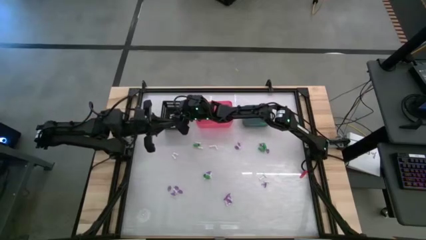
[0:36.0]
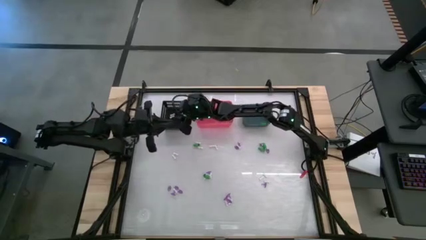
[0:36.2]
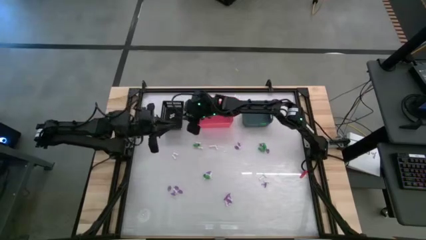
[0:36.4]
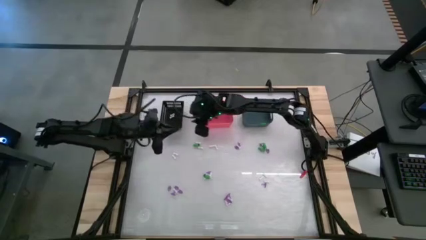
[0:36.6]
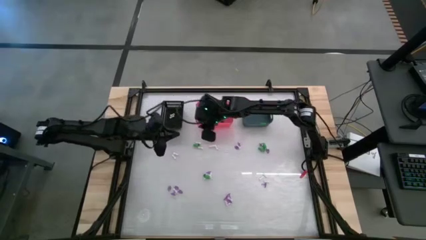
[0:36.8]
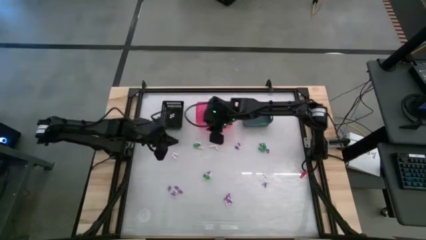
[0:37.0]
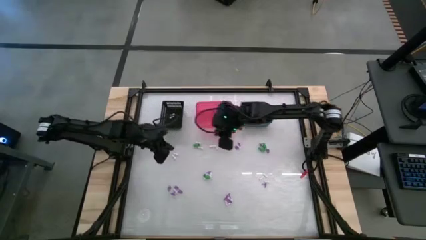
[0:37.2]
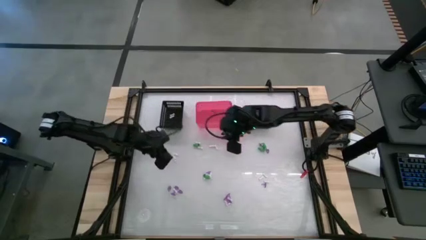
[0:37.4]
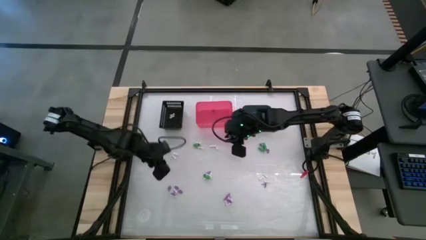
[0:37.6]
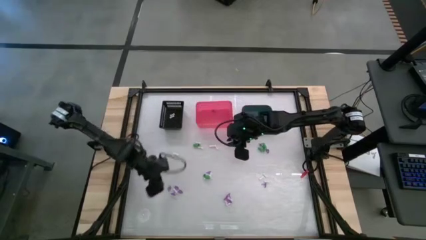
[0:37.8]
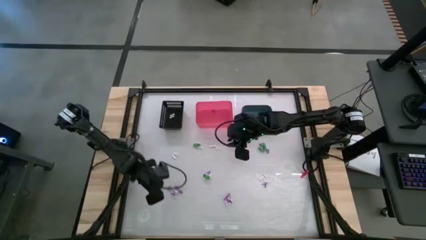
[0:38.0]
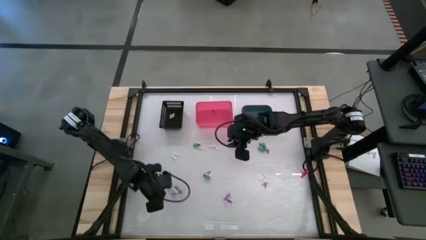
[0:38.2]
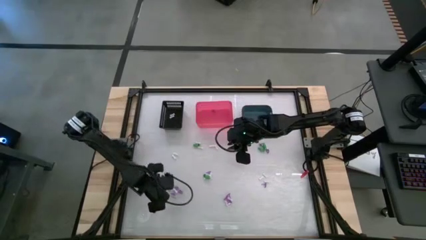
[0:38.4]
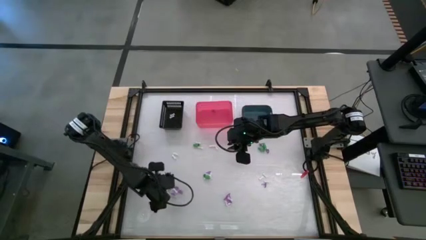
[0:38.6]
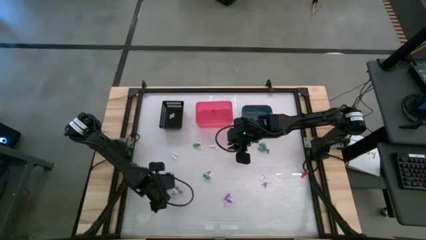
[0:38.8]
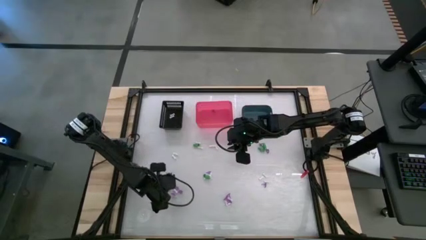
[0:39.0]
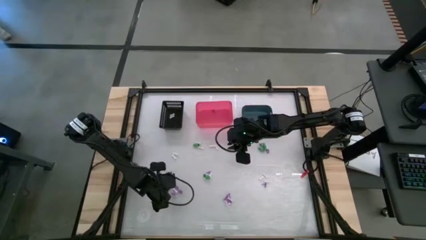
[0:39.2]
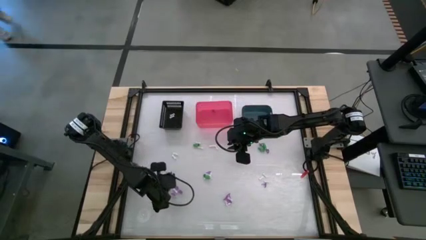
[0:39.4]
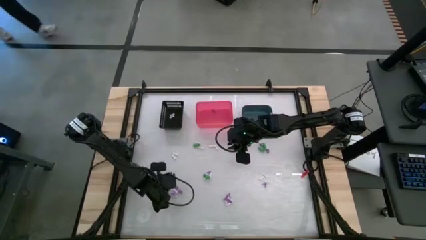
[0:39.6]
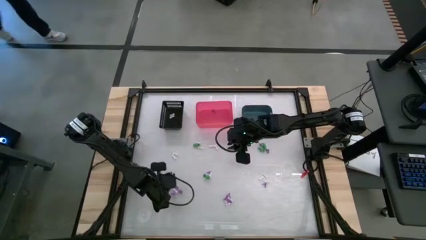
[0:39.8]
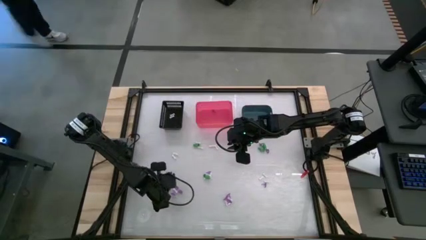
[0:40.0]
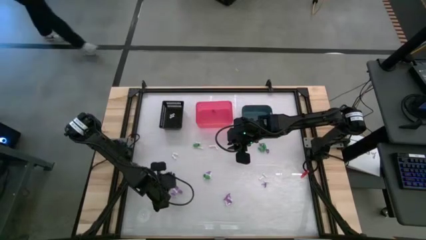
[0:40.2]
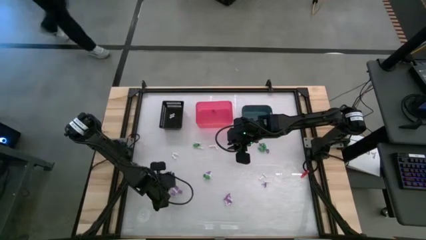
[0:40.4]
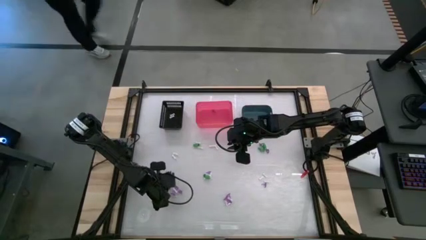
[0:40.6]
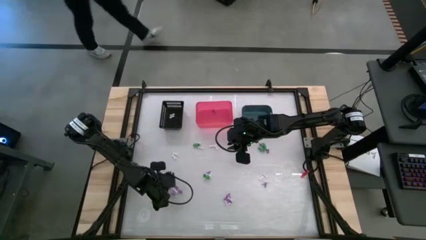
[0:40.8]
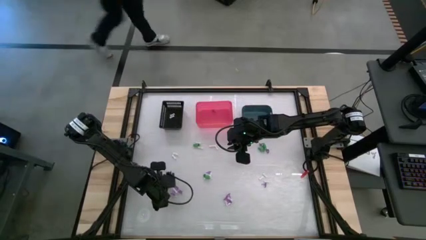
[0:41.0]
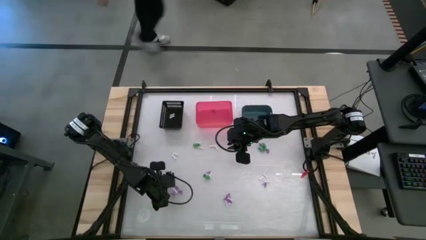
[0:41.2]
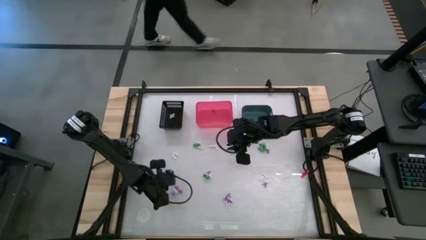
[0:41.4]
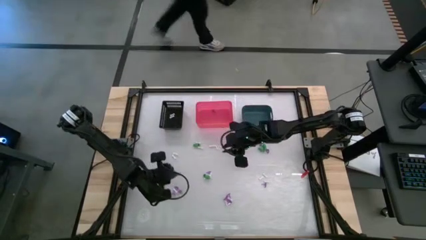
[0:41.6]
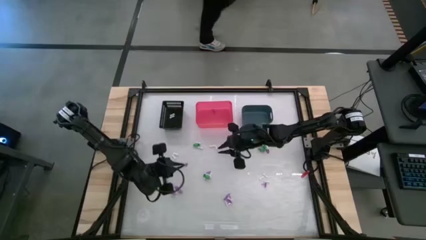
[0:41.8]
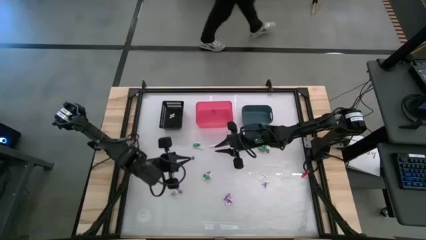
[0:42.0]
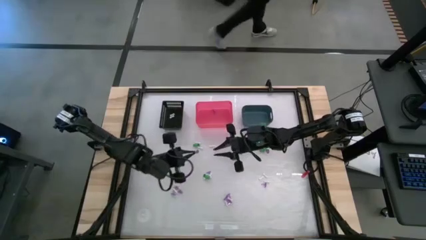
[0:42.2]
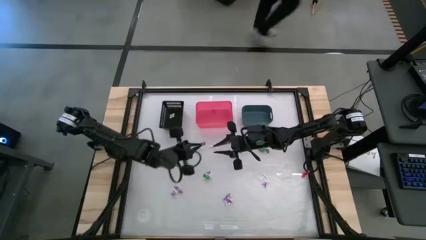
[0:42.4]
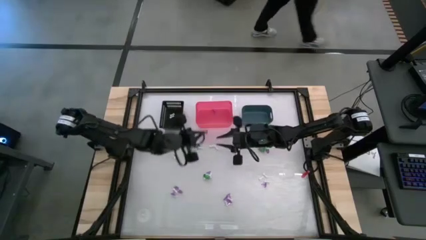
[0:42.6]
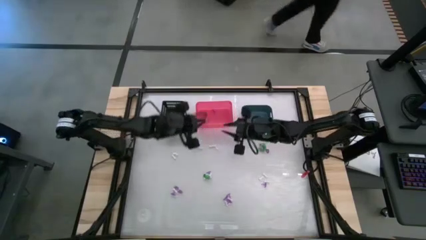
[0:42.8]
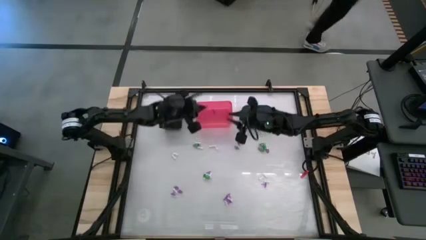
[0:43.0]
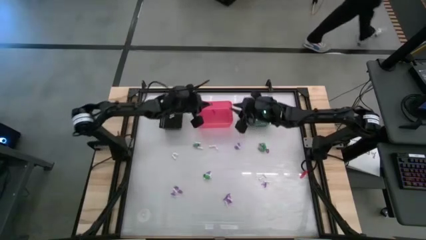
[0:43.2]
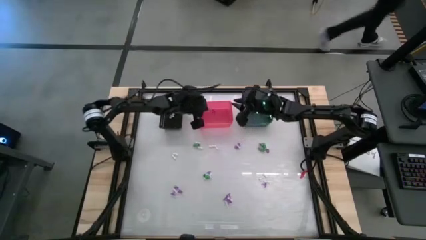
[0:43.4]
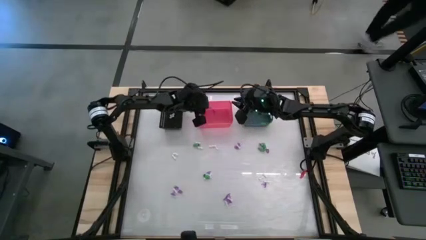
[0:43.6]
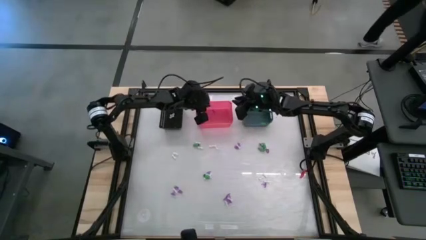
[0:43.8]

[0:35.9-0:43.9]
Task: Sort Halloween decoration
Put the purple hat toy into the pink bin

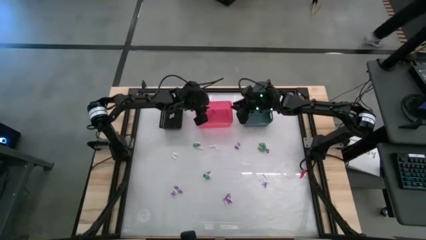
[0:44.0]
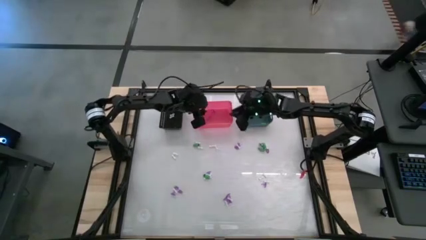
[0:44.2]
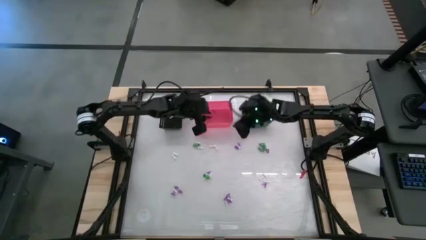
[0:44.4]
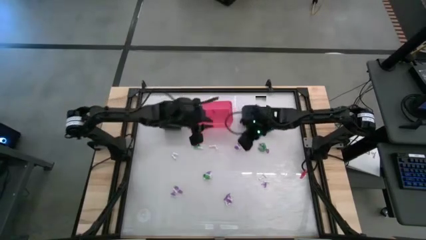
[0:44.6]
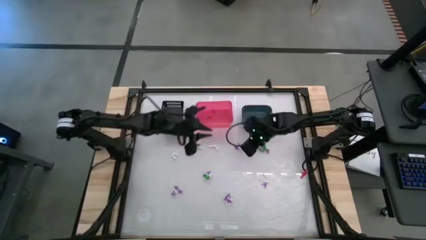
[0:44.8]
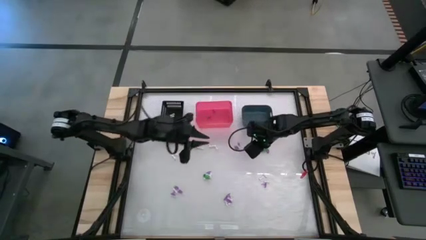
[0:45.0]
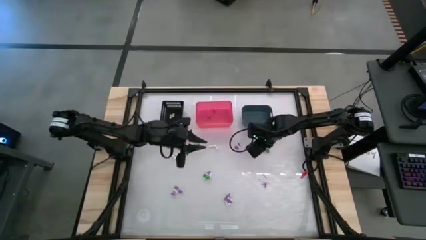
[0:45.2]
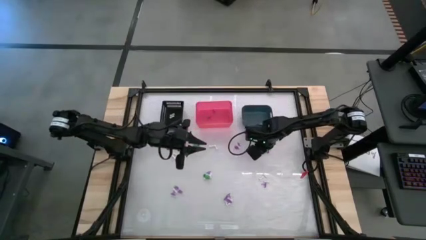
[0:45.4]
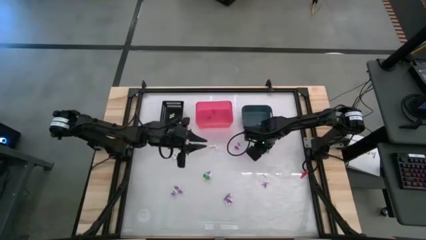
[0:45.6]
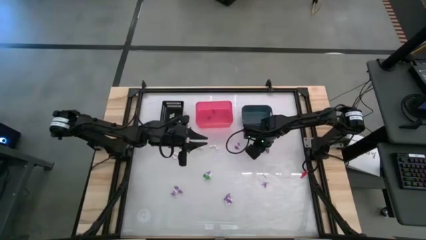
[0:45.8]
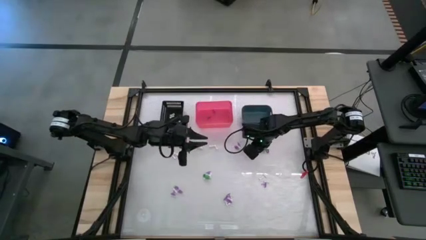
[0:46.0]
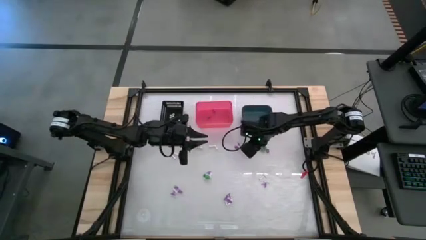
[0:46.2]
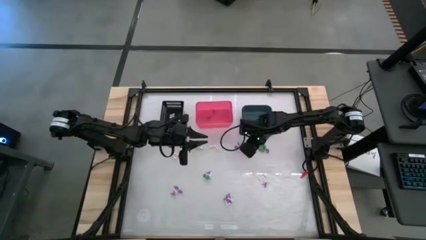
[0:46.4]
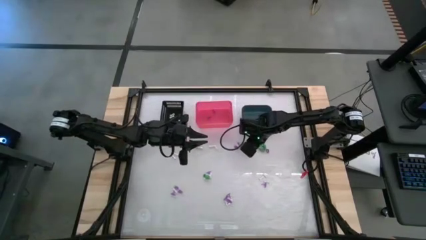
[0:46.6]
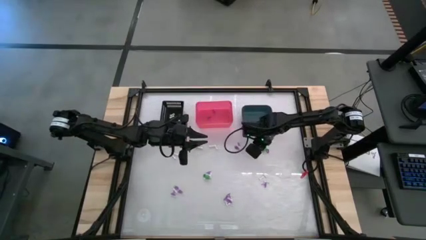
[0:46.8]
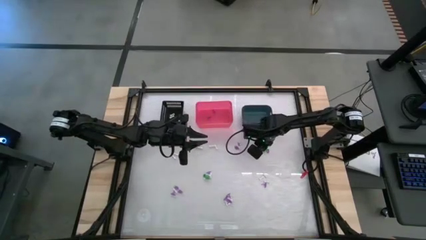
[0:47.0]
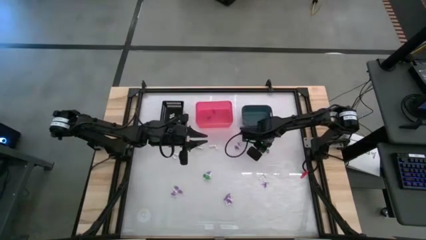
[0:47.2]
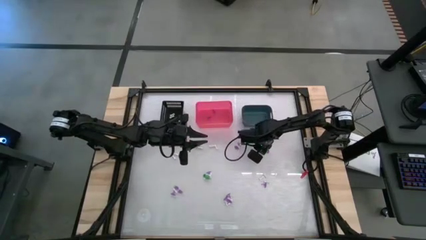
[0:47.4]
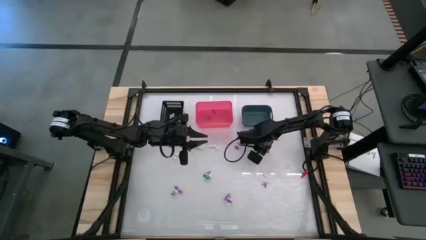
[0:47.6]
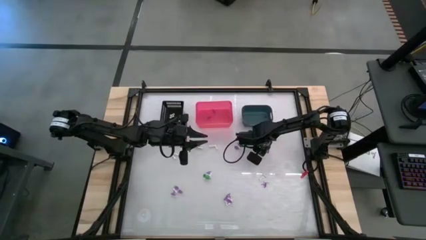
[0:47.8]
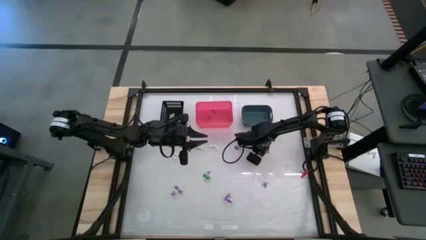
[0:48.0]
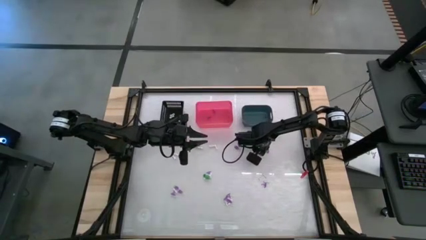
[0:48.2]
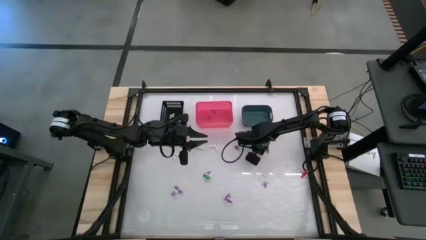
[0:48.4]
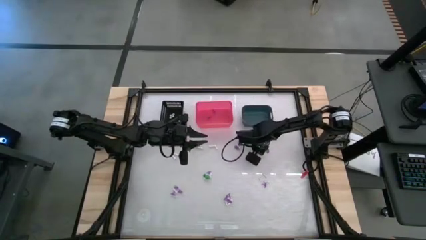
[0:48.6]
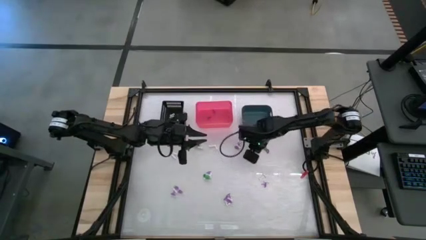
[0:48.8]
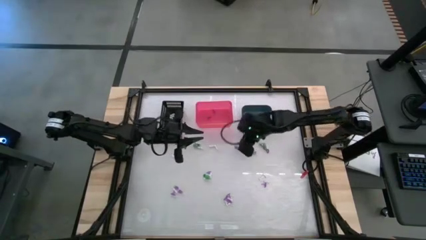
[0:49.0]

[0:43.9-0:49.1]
Put the green skeleton toy into the blue bin

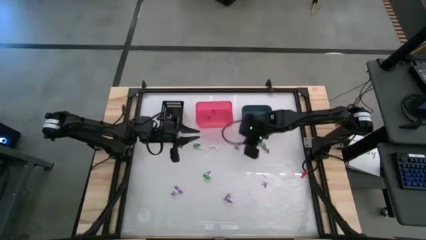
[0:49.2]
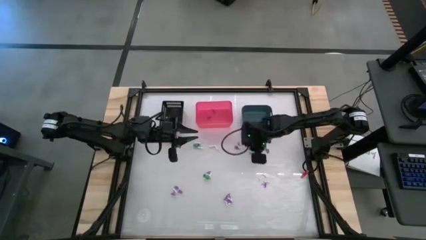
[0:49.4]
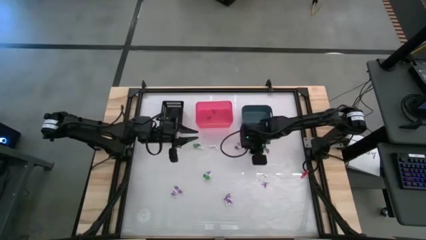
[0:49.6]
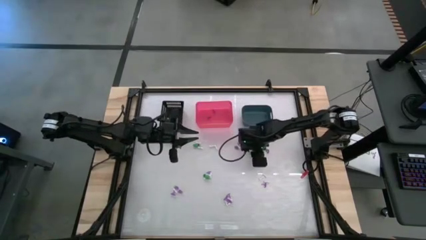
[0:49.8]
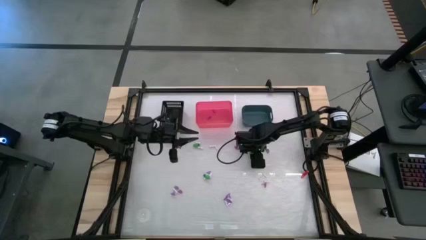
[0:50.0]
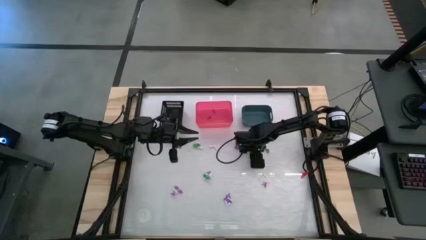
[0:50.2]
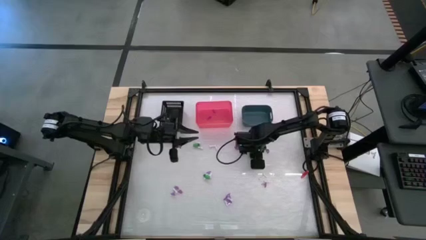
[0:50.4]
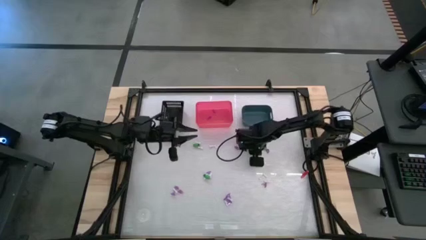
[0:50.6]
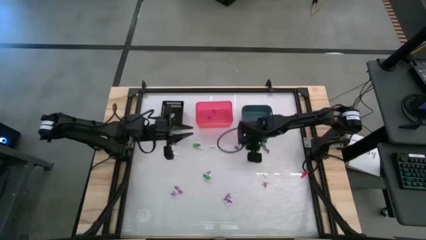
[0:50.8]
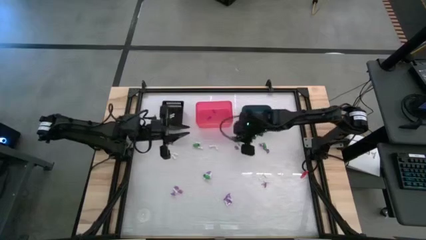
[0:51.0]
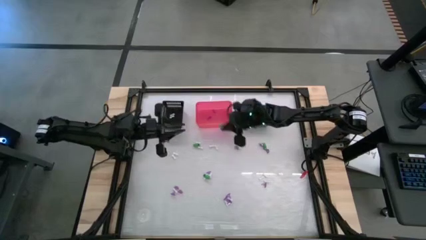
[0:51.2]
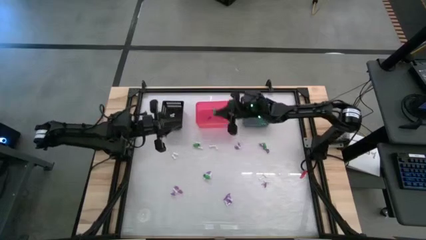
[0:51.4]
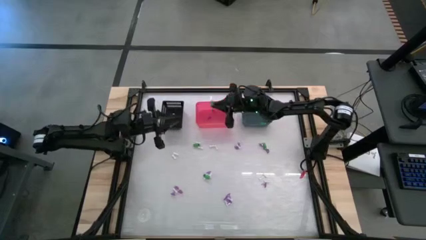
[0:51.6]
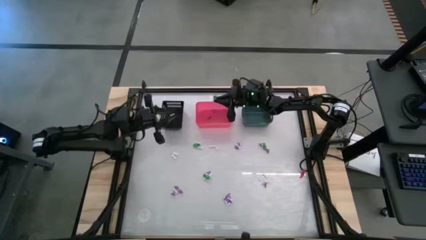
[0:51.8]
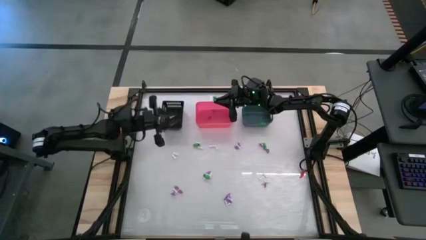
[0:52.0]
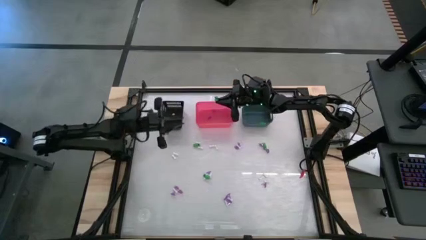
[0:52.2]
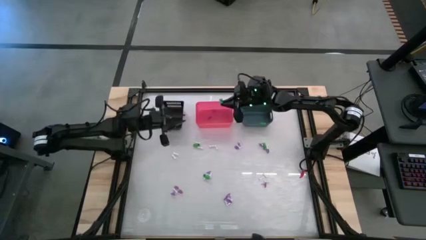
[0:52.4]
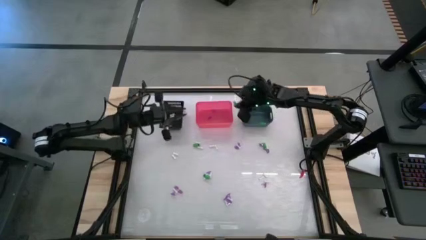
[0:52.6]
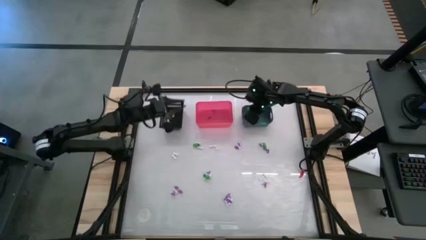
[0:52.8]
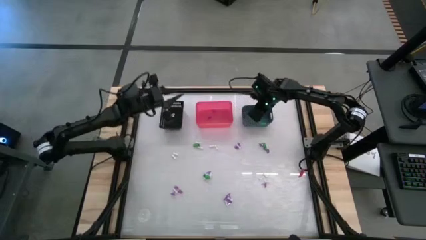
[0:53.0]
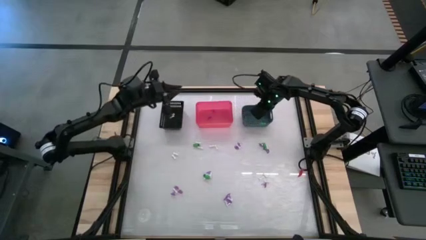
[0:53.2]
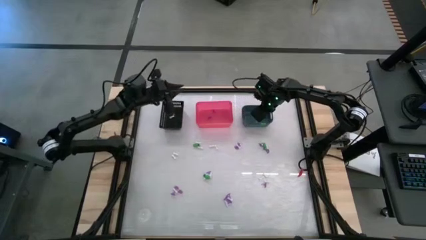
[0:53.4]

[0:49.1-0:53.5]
Put the green skeleton toy into the blue bin
